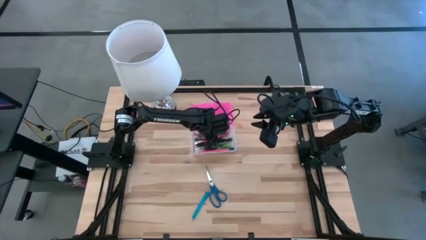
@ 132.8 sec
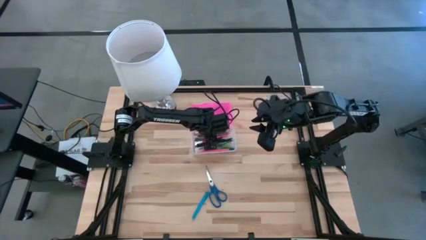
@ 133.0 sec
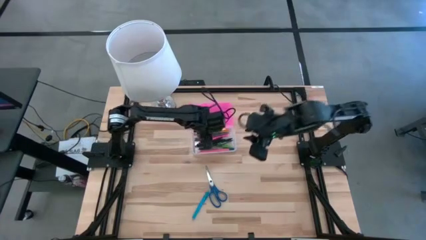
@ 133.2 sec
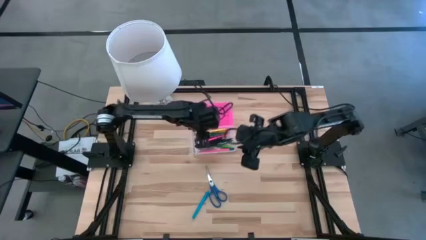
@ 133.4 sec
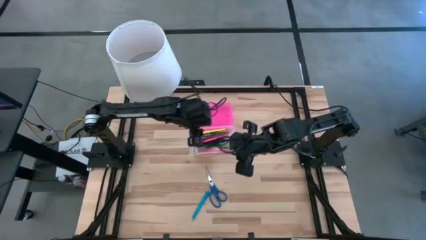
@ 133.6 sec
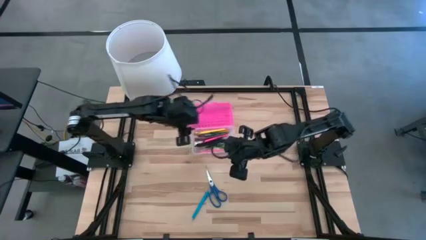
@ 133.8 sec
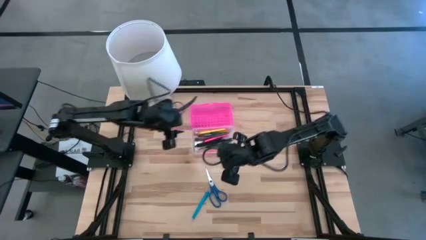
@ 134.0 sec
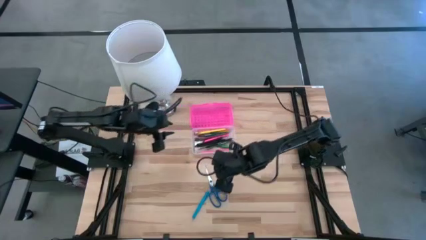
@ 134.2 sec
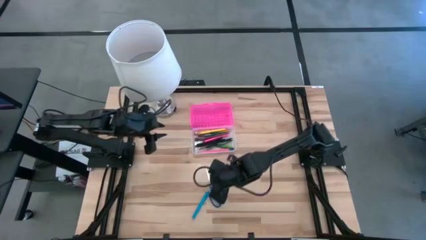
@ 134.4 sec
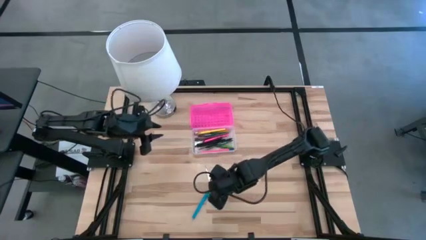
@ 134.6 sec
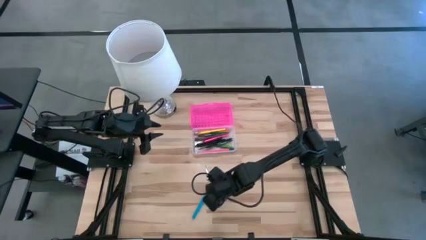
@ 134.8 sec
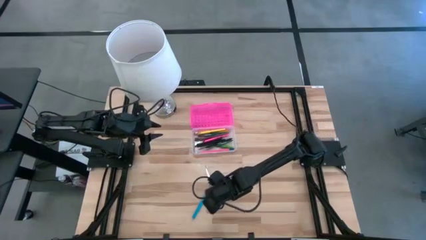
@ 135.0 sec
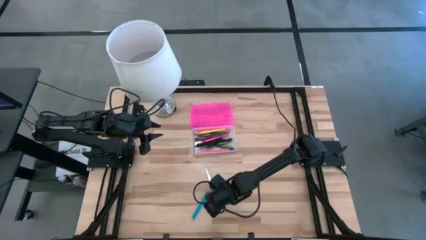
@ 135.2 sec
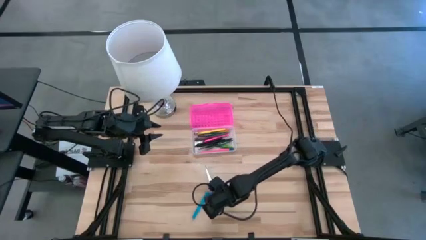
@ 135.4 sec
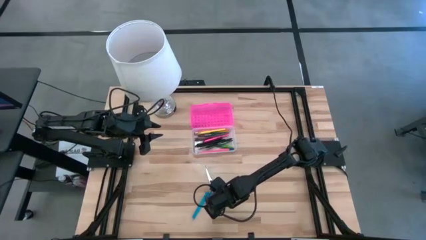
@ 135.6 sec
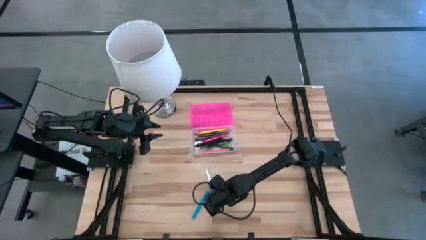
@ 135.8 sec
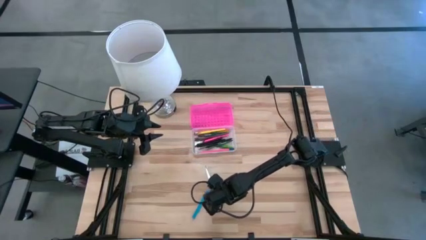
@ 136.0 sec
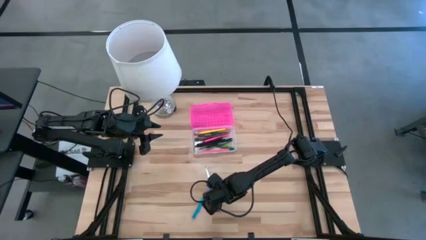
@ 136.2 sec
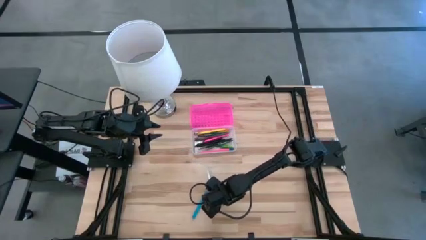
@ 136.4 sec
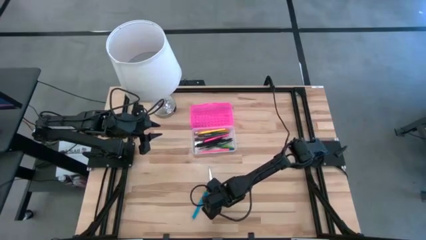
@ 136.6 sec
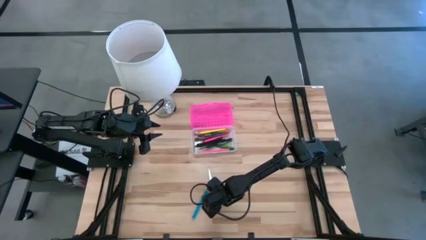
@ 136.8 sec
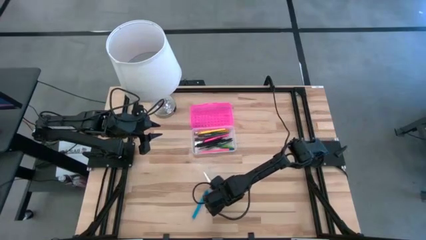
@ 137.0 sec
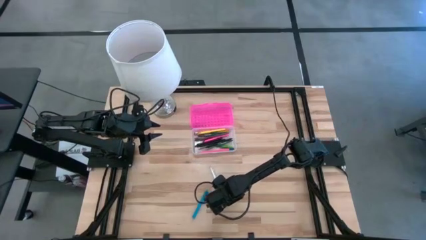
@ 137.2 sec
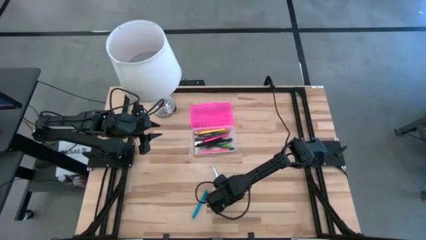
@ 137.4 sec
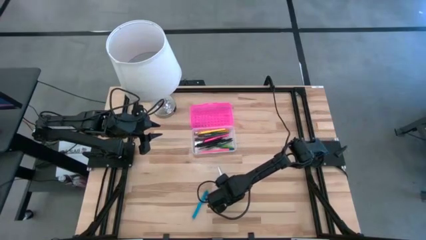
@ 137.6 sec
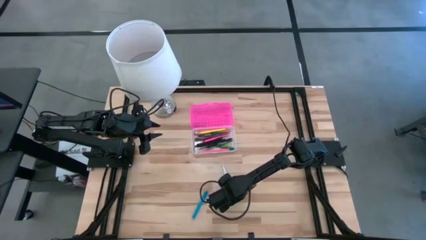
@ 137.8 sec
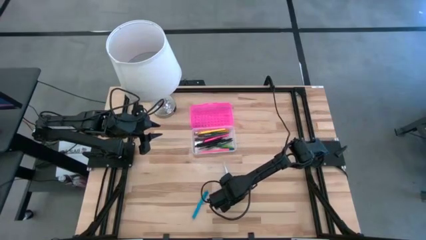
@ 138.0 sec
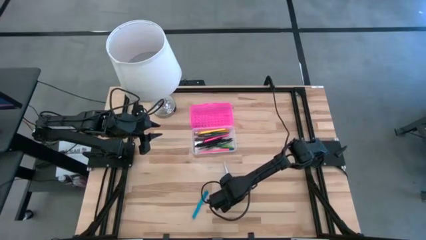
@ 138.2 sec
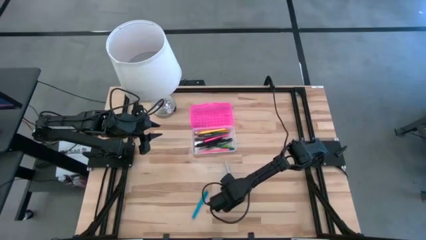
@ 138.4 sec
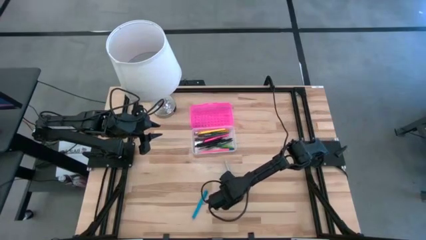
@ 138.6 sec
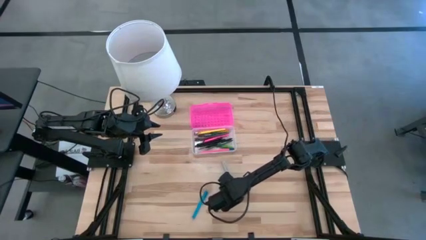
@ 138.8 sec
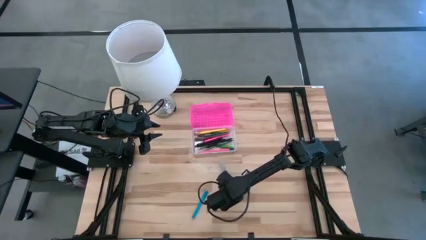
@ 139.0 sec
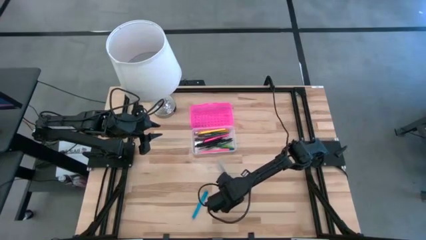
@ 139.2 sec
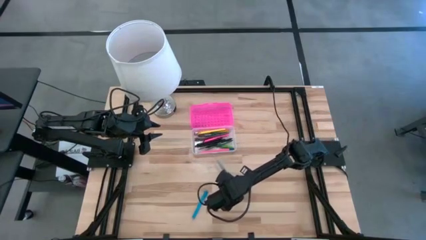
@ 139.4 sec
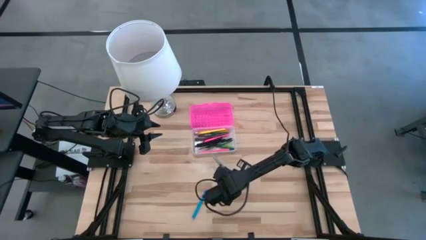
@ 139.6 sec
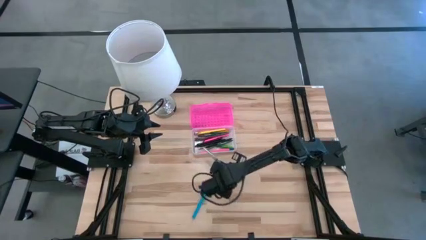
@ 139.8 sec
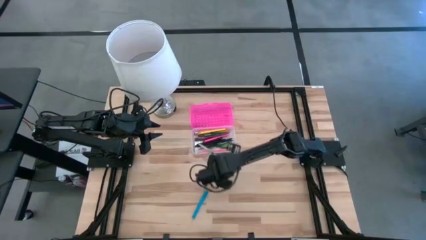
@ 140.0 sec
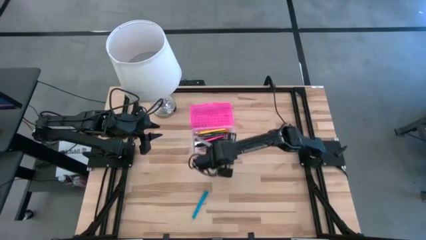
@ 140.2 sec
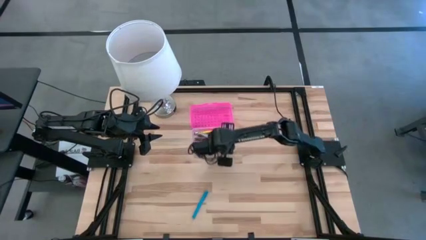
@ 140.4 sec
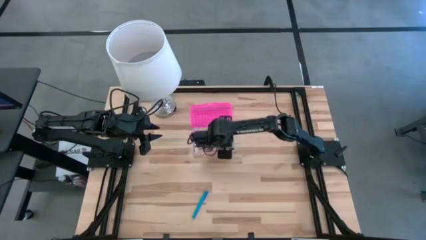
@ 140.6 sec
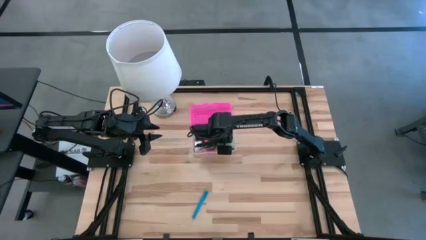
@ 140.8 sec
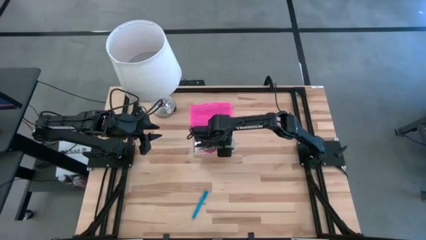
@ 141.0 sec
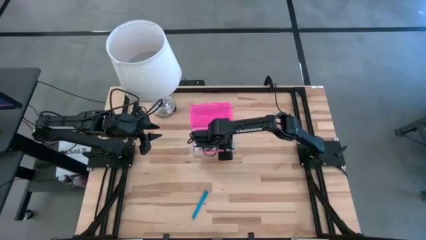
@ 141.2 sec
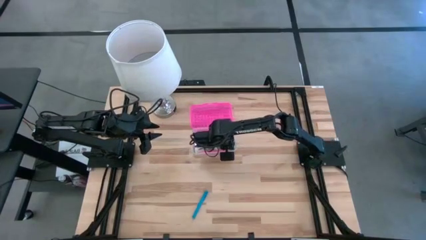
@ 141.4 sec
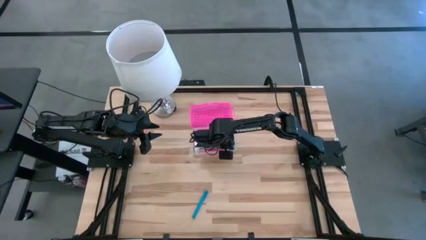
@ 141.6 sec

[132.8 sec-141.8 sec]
Task: Pick & place school supplies into a supply box
Put the scissors into the supply box

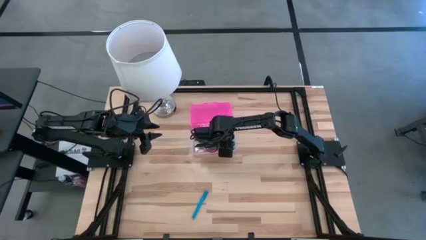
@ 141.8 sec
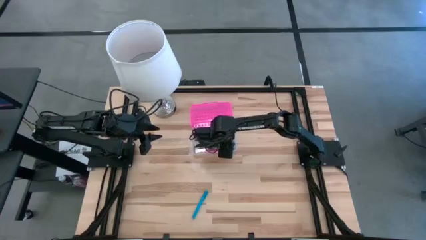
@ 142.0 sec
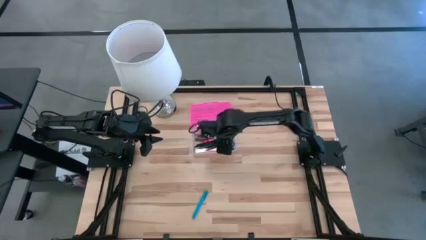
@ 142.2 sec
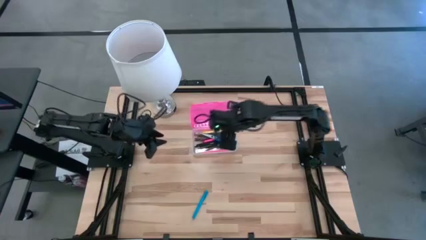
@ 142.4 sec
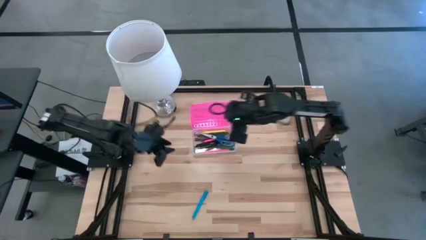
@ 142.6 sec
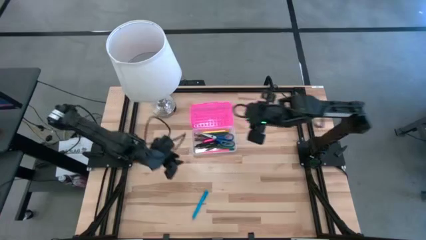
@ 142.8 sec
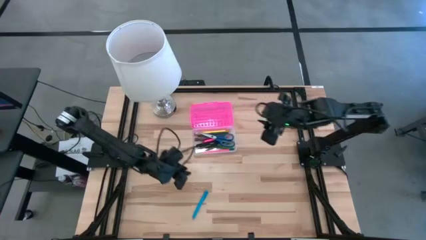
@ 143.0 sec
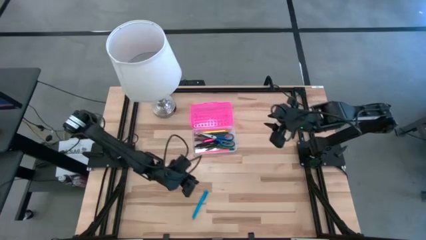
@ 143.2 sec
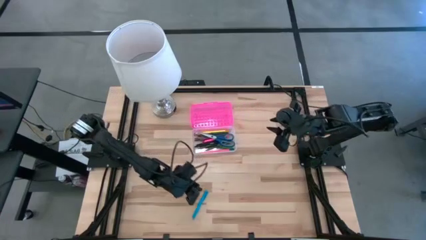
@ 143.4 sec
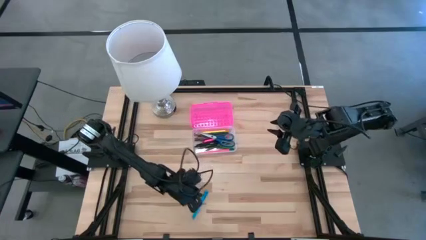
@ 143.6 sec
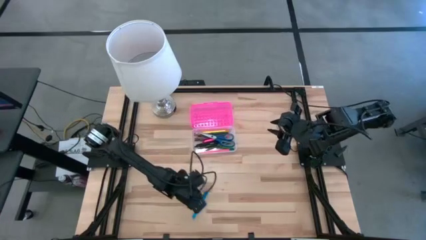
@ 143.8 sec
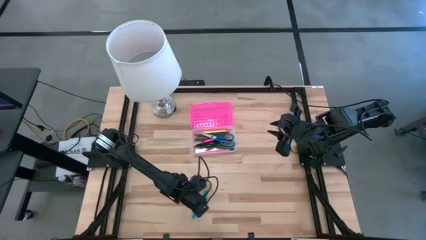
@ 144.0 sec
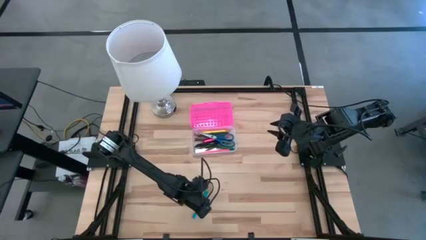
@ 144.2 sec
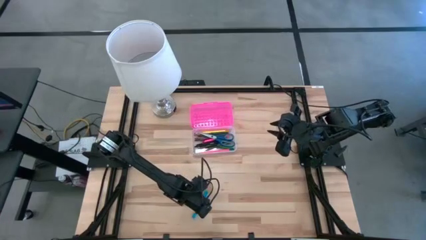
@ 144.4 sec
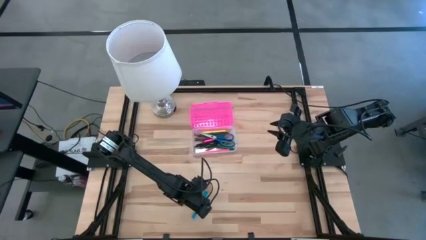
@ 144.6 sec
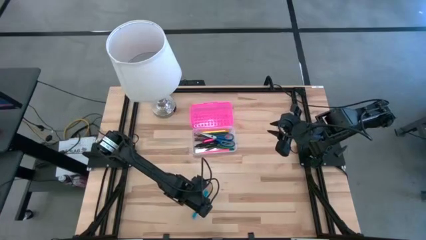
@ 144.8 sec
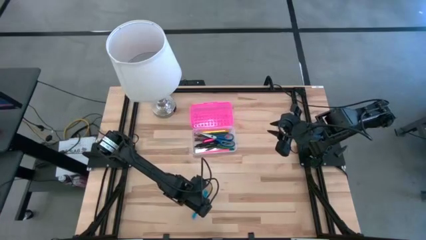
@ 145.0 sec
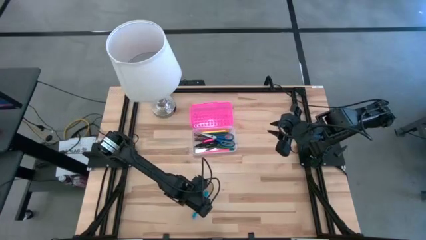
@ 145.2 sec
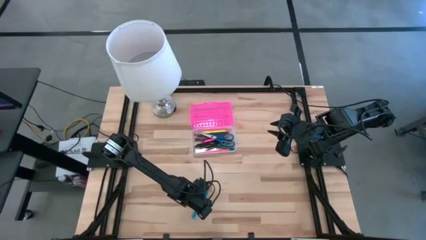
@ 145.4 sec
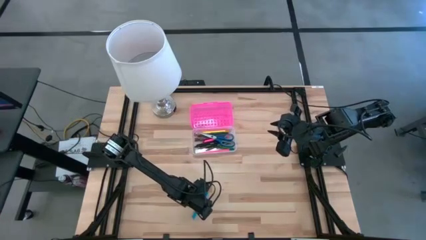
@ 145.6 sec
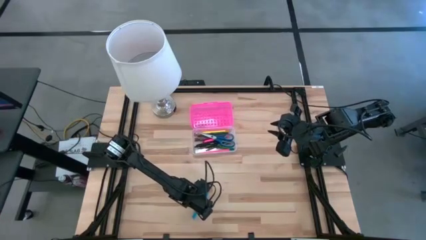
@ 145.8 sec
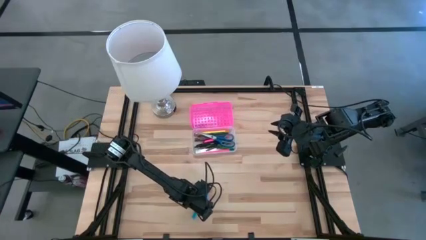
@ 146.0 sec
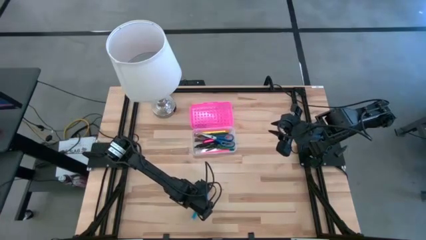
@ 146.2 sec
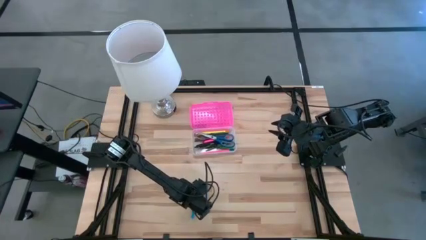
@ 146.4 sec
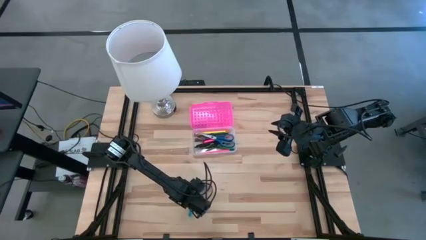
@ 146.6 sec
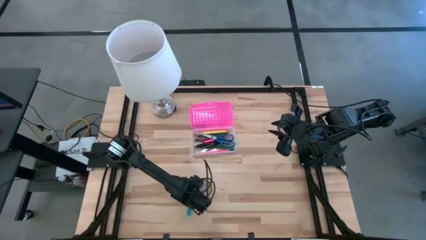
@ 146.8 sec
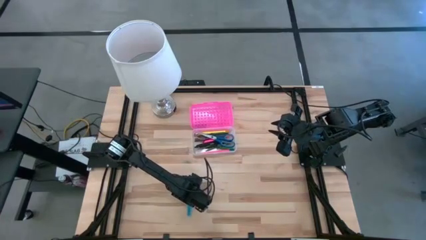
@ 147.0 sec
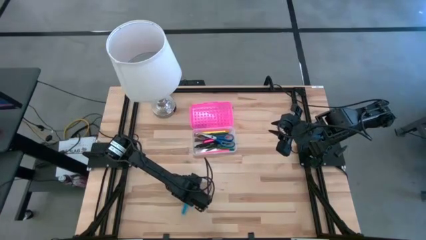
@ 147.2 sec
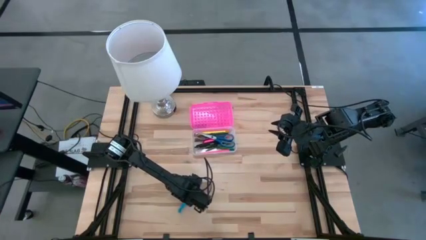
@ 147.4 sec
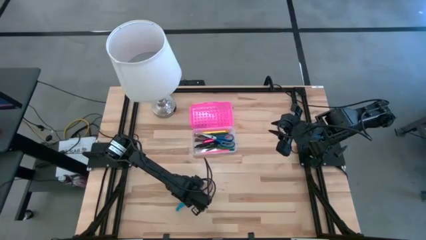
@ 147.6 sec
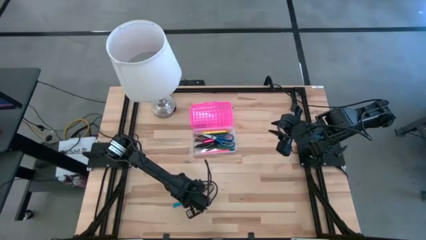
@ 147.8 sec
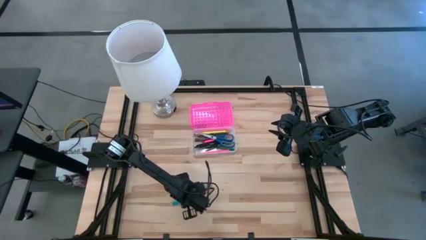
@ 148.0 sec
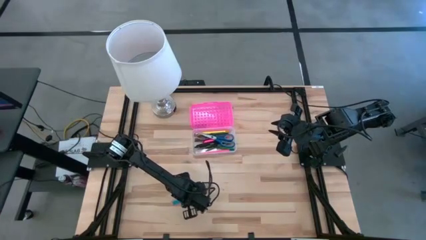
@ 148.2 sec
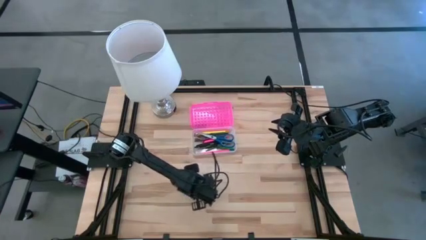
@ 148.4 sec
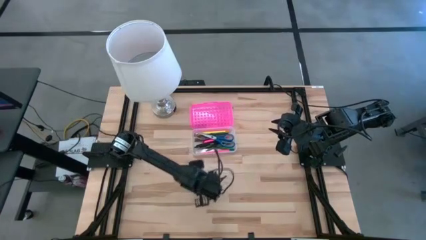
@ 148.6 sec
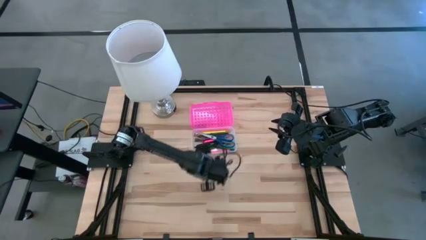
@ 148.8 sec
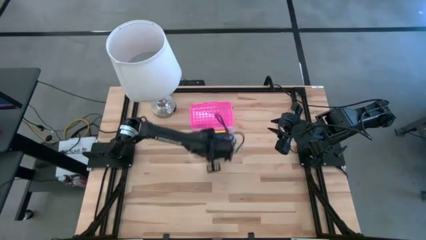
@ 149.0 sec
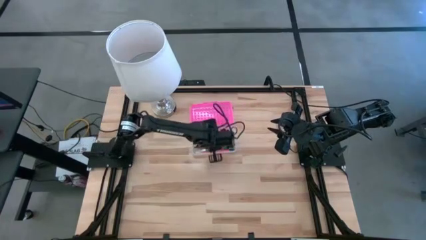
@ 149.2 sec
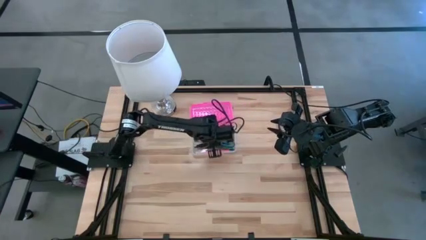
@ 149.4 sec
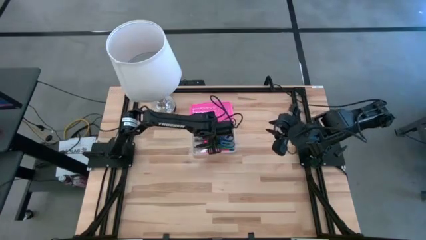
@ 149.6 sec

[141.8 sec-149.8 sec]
Put the blue pen into the supply box
